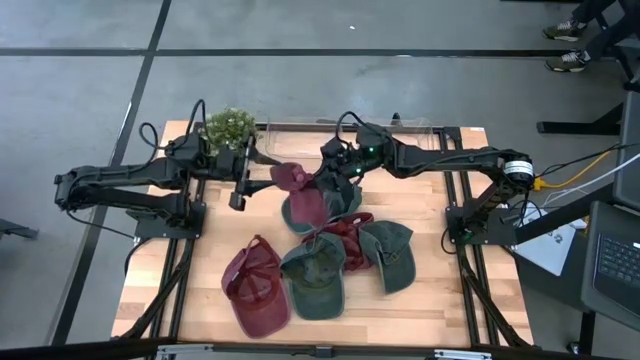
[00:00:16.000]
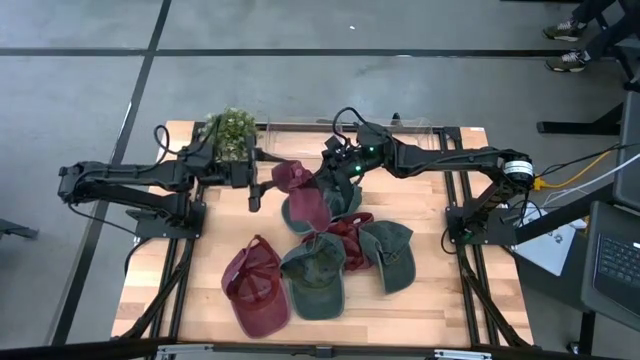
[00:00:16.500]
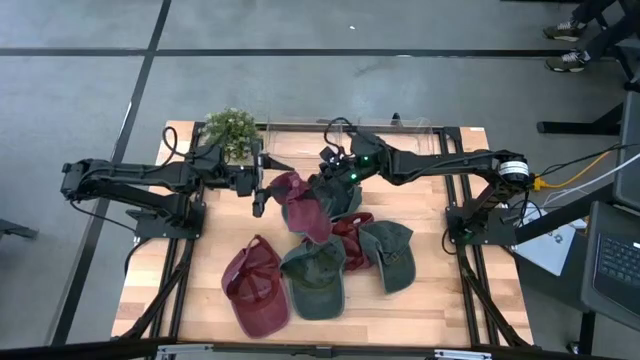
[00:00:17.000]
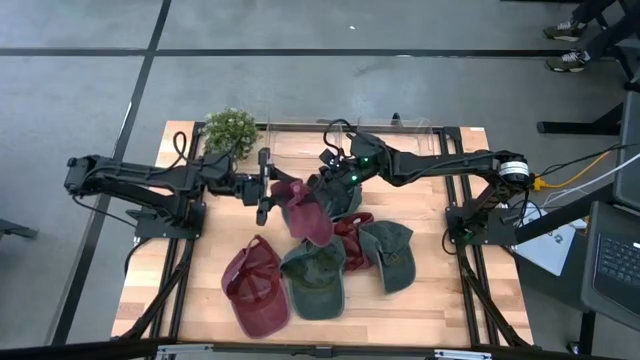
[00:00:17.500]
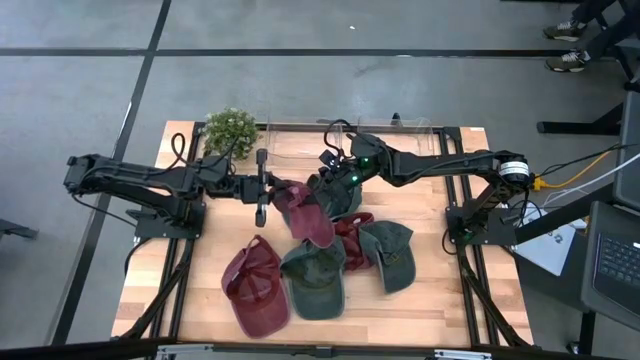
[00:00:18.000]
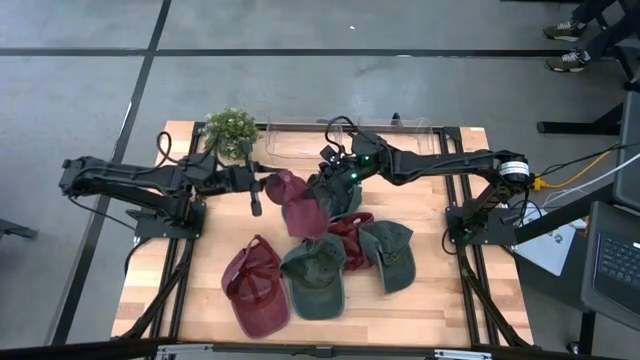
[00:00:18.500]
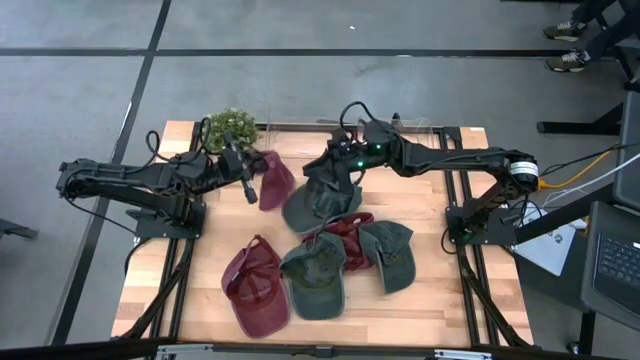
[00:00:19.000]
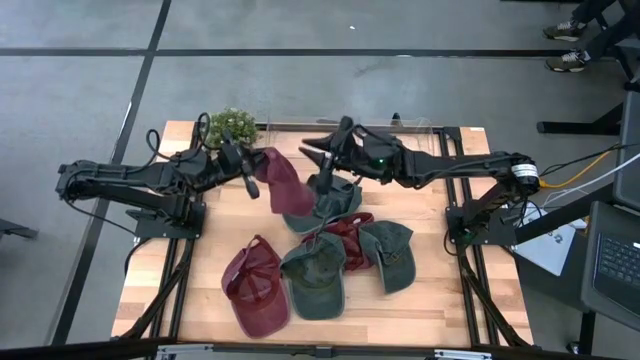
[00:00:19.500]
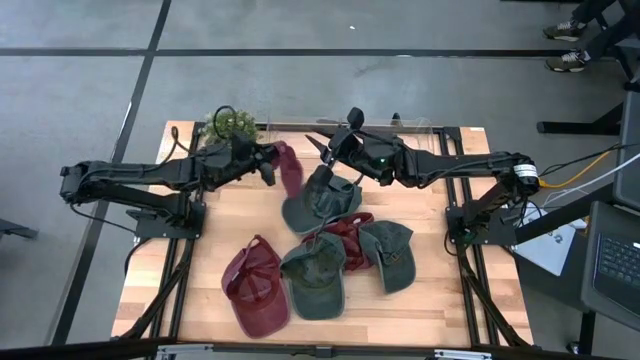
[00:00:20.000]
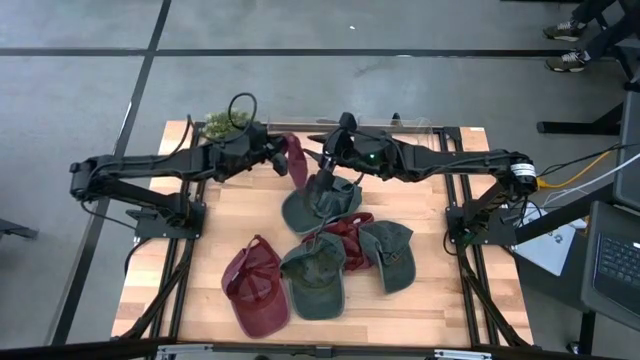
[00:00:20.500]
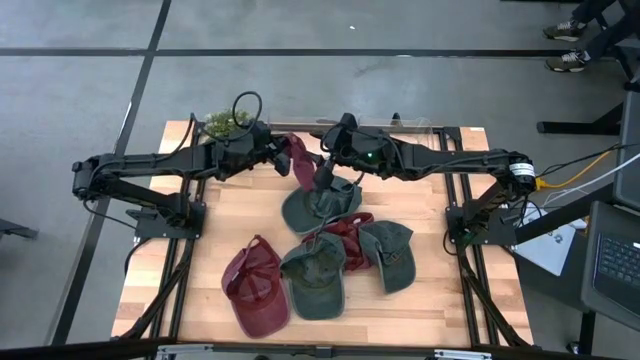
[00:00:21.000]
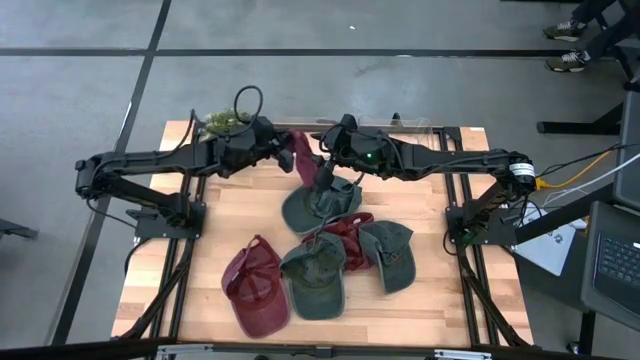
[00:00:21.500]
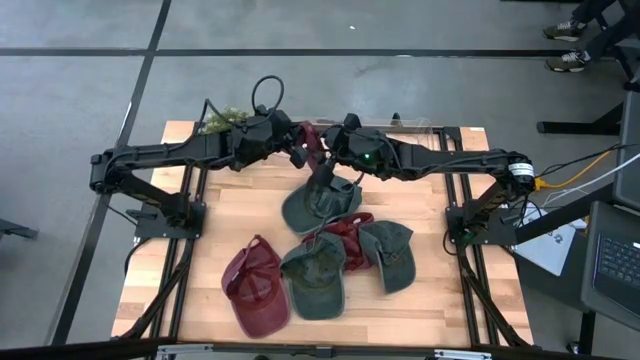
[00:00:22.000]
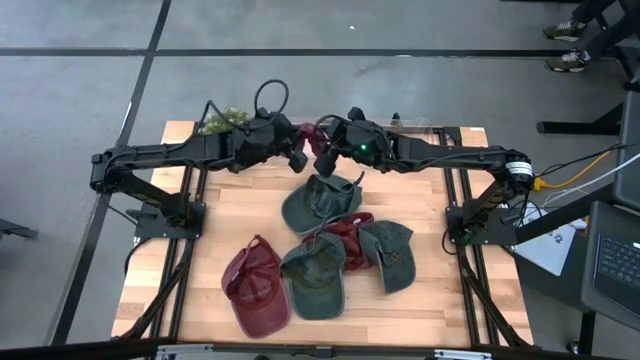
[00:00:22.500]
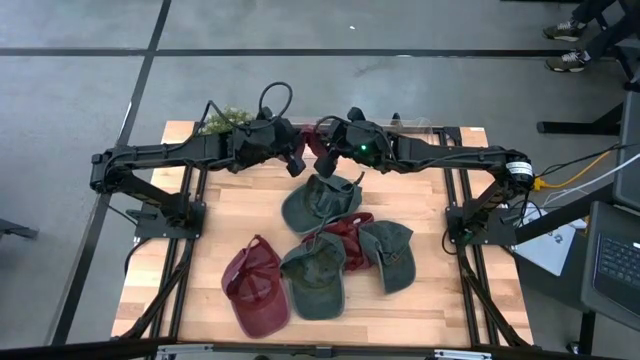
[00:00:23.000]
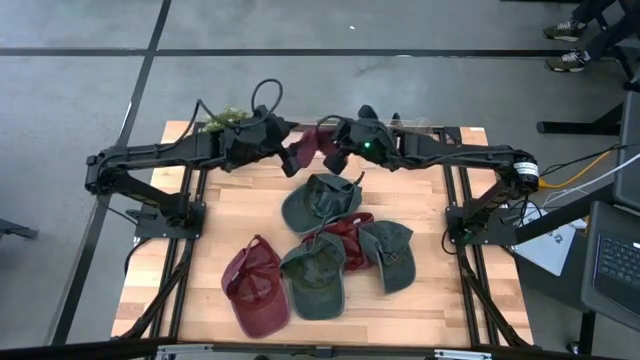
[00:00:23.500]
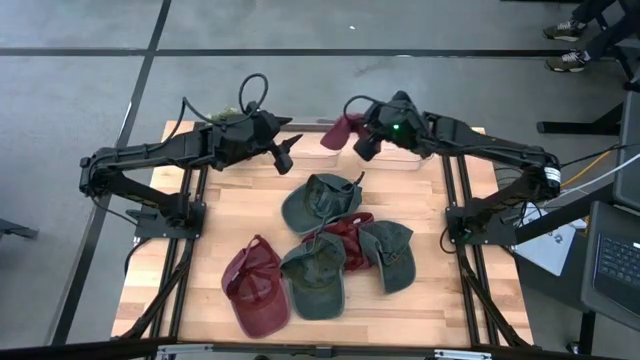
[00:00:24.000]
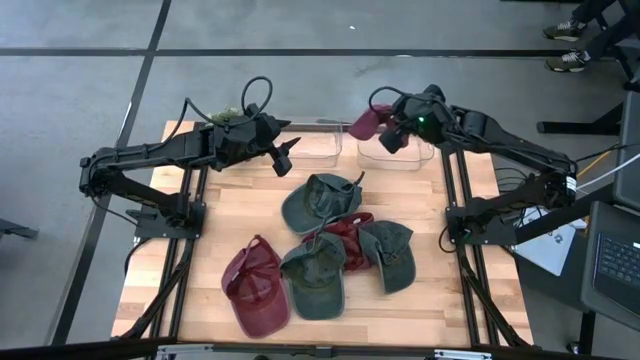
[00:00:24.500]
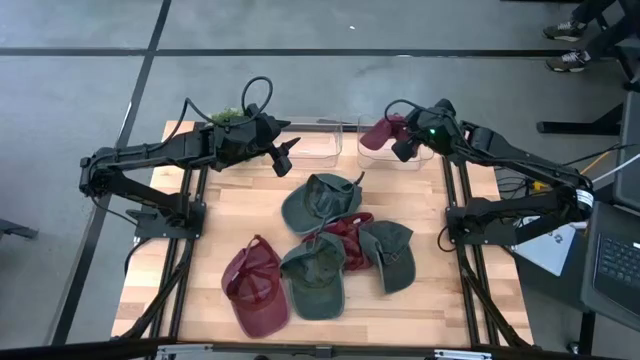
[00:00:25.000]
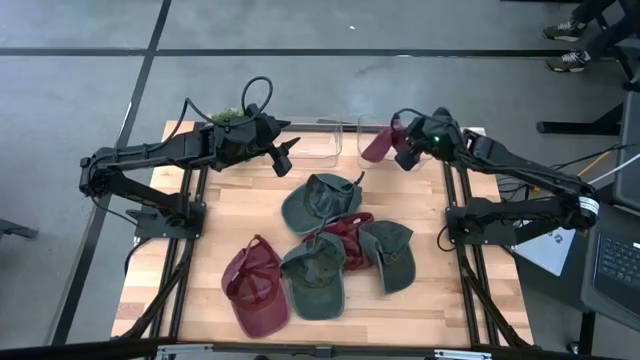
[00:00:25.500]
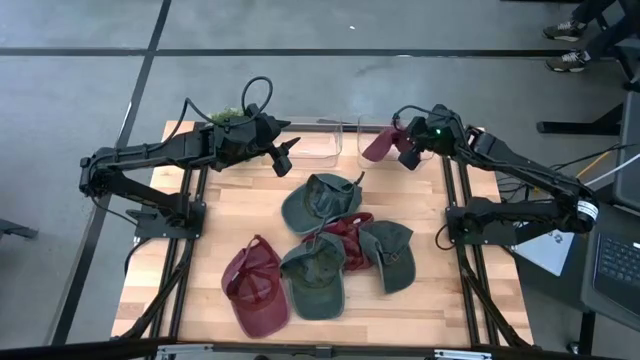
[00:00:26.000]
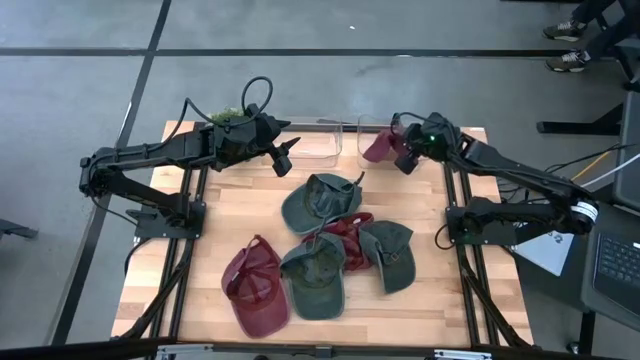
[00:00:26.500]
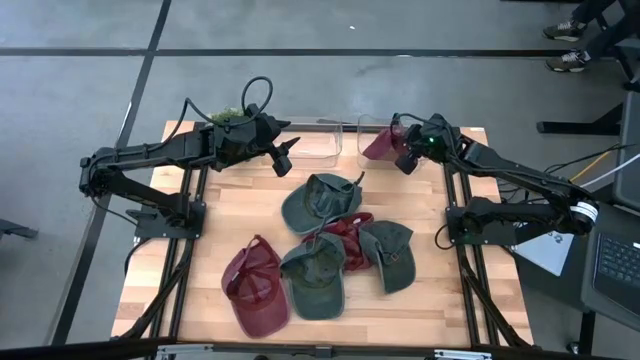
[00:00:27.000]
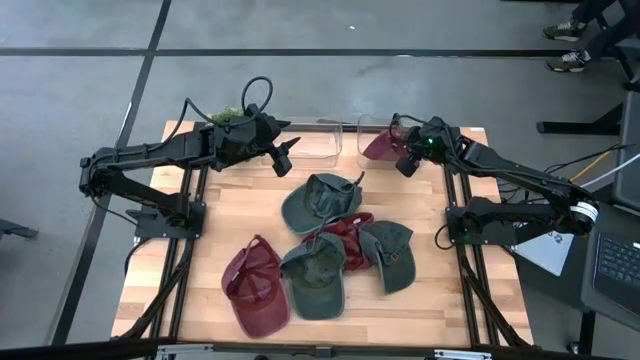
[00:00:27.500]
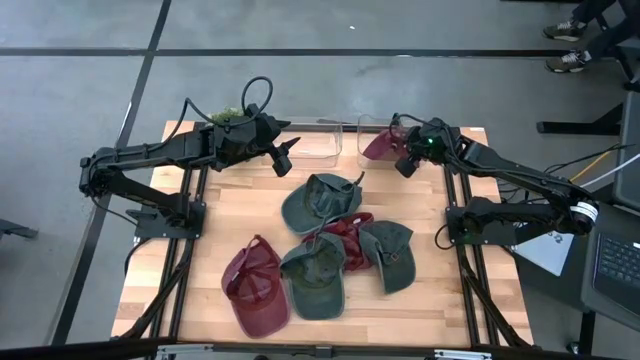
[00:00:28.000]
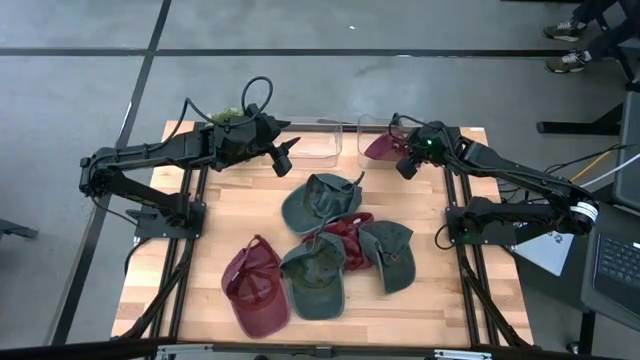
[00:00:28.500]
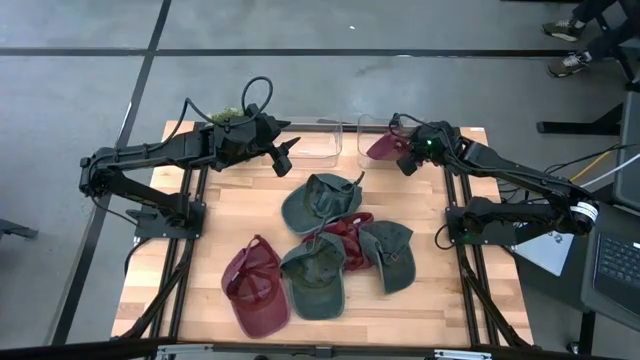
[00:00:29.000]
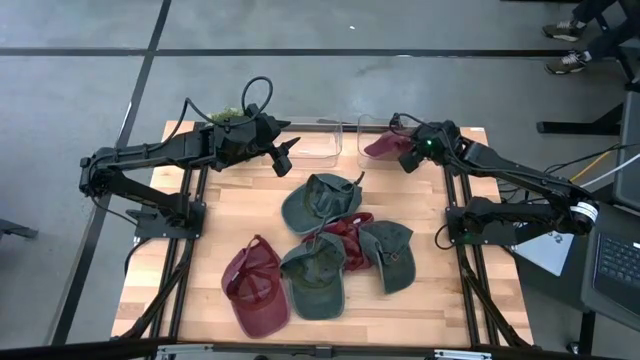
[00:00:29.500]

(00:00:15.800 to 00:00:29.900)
Task: Pick & Place hat
Put the top right red cap into the right transparent bin

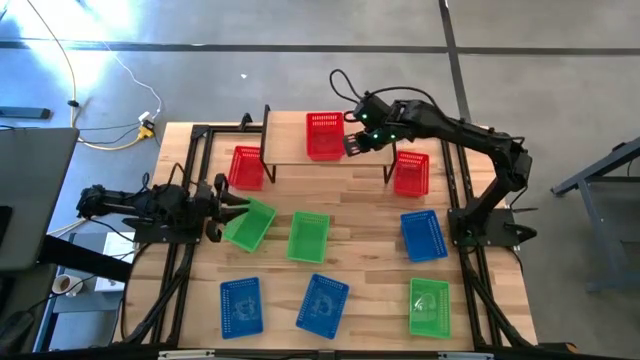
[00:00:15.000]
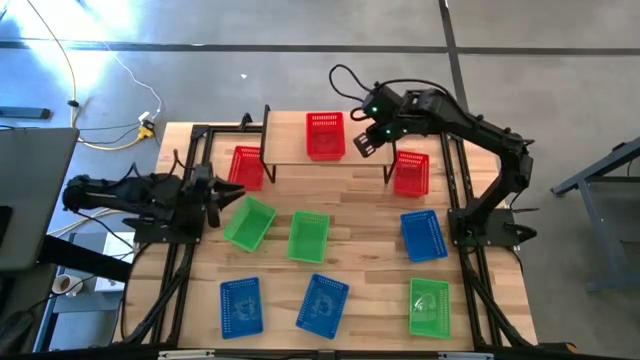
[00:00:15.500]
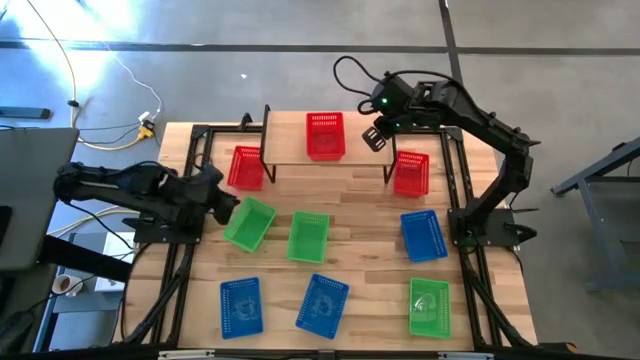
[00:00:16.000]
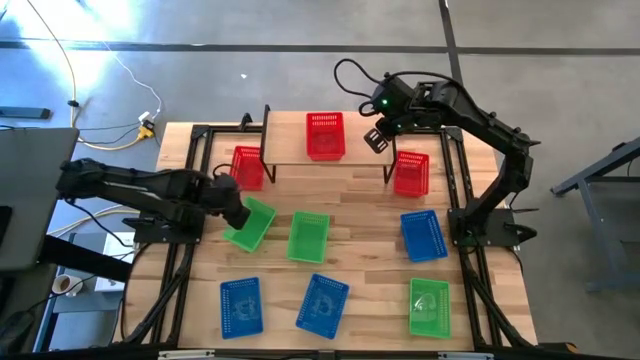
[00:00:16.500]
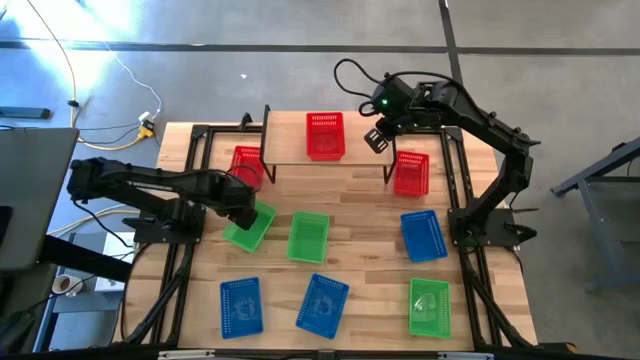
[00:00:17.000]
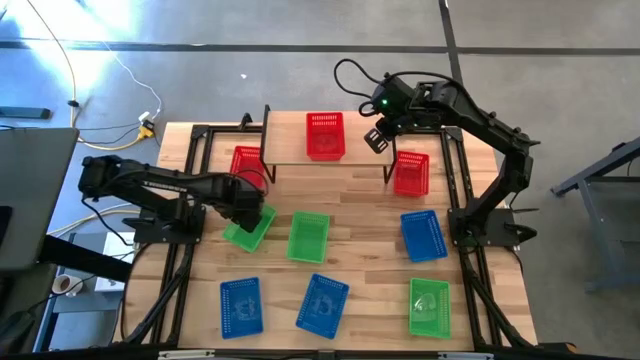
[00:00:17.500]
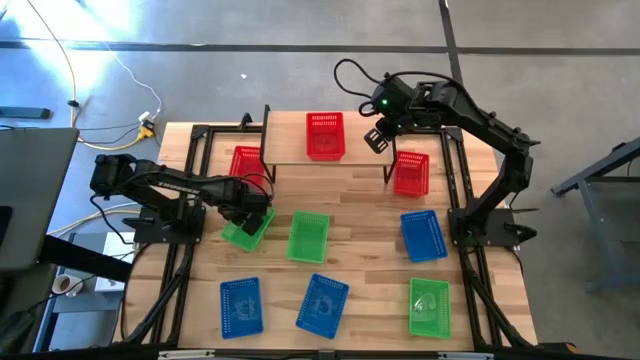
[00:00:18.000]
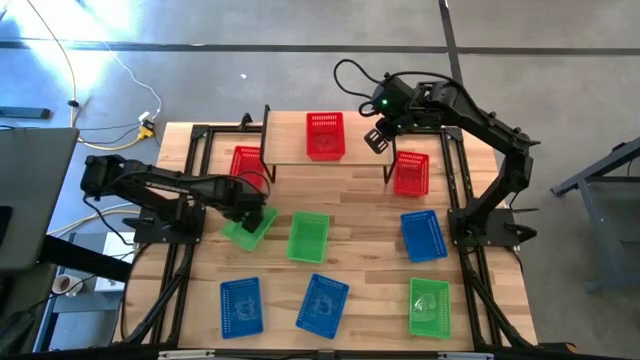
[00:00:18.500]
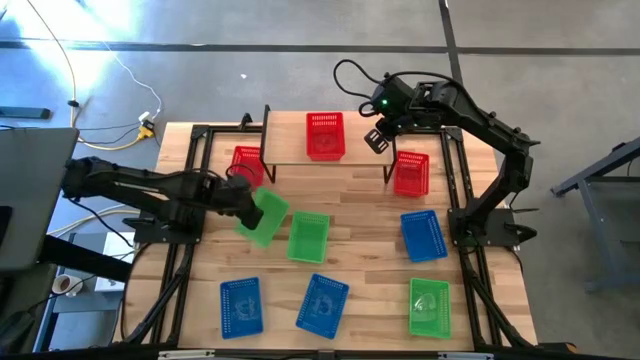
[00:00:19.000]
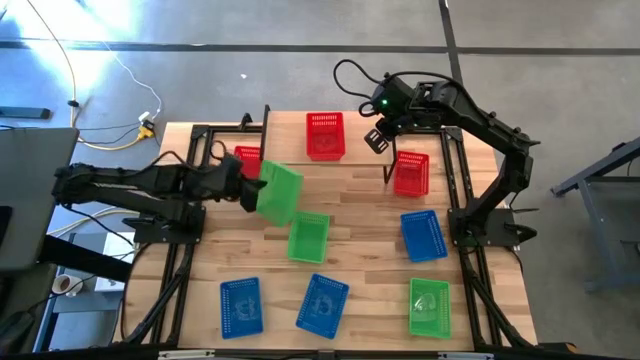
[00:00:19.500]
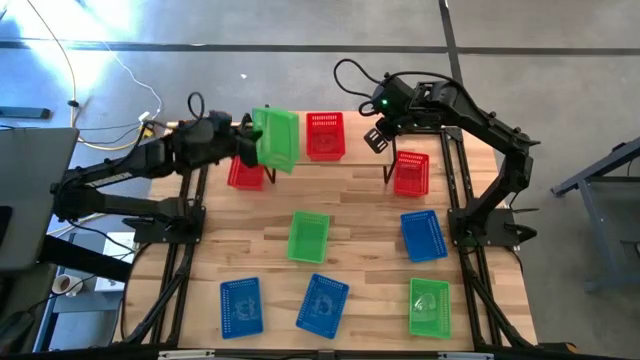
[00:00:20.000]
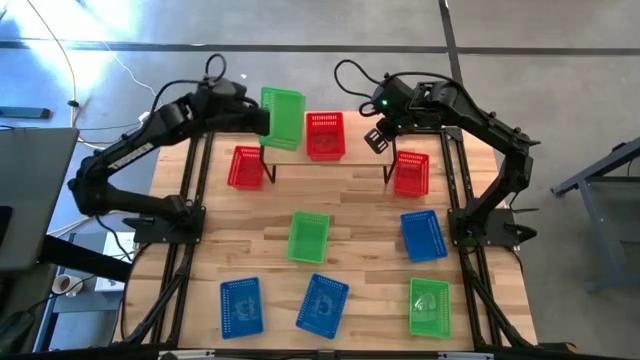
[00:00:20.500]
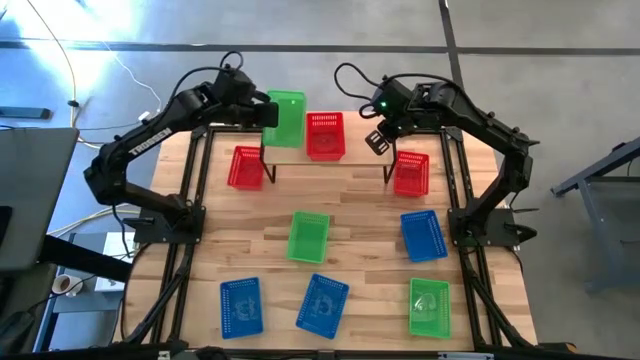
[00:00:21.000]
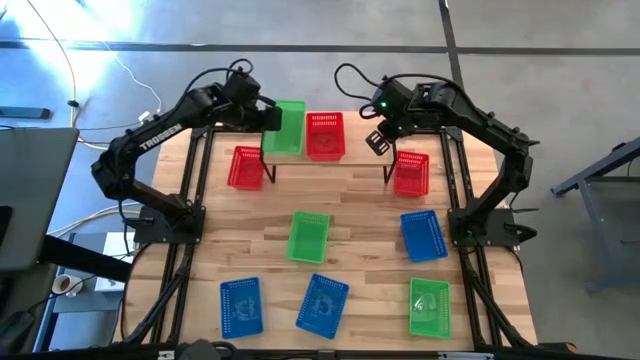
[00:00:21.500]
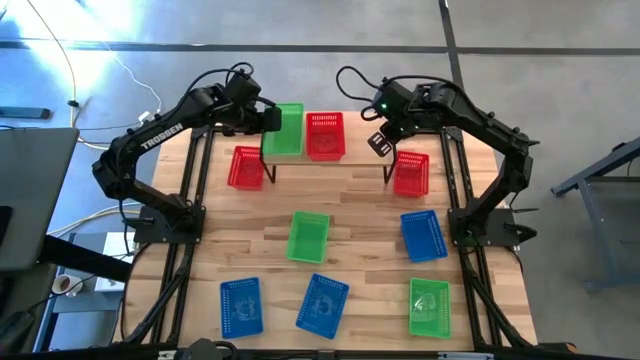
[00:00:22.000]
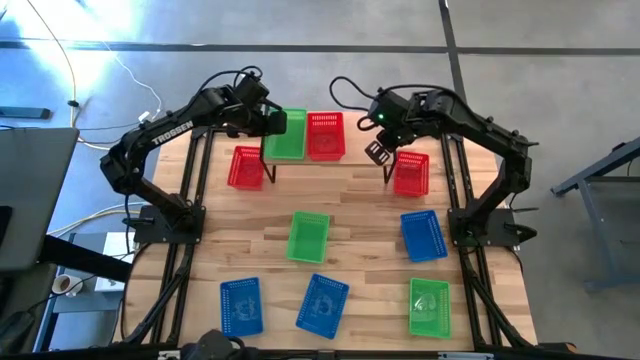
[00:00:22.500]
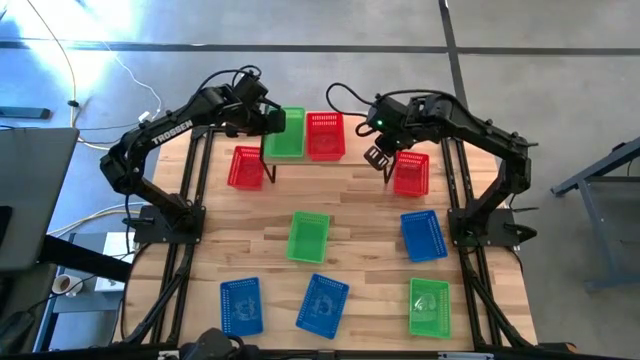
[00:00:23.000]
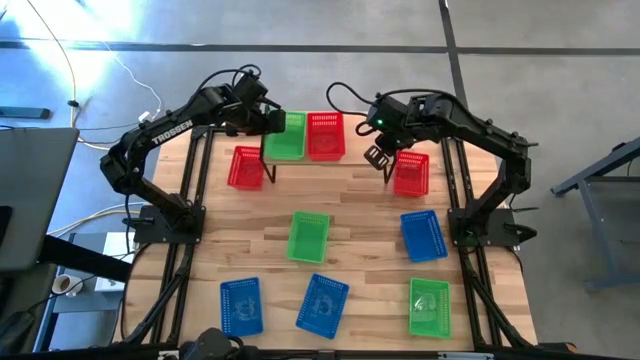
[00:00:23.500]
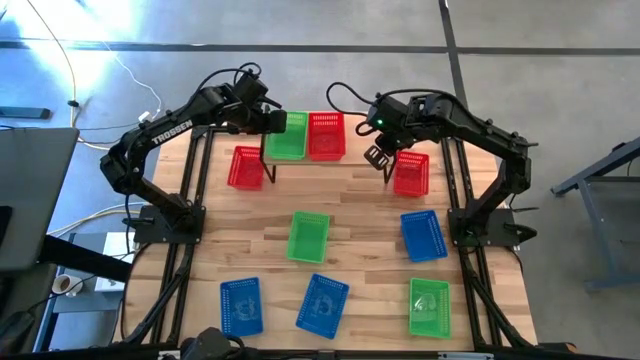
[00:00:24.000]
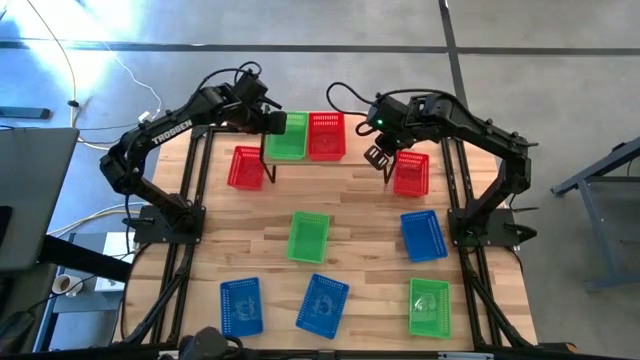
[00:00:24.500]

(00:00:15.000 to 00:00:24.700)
Task: Stack baskets on shelf by color
Put the left green bin on the shelf
